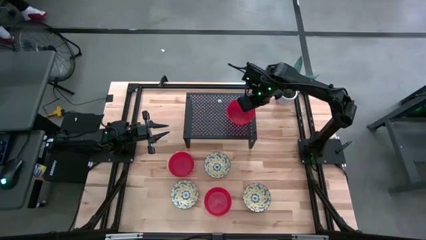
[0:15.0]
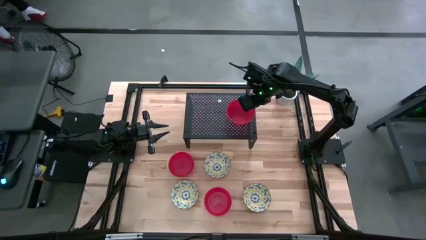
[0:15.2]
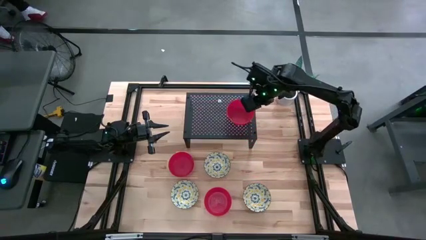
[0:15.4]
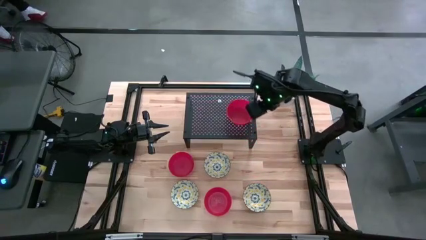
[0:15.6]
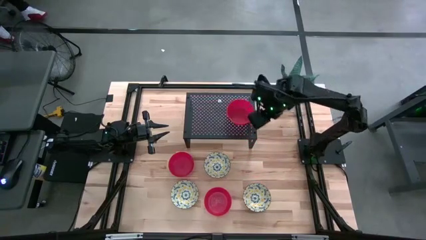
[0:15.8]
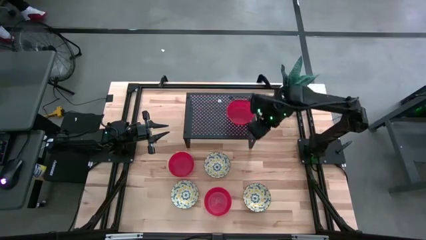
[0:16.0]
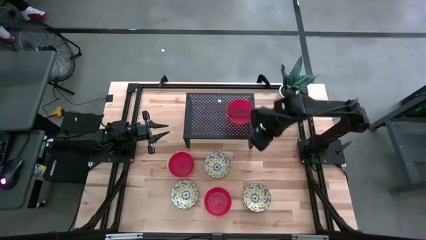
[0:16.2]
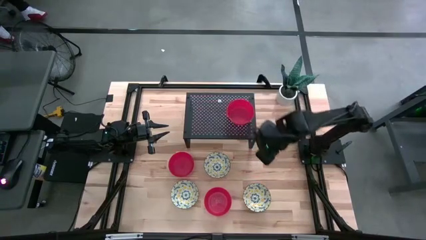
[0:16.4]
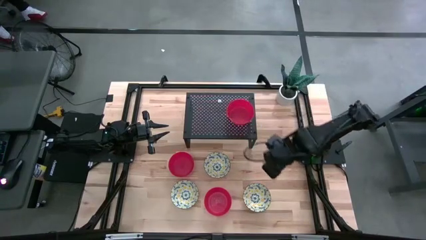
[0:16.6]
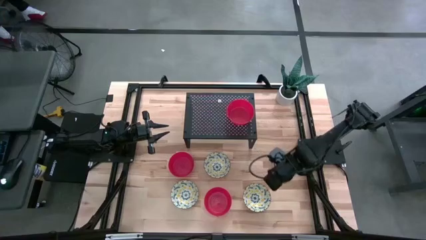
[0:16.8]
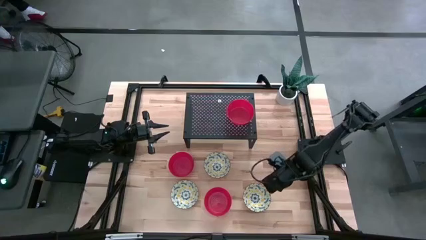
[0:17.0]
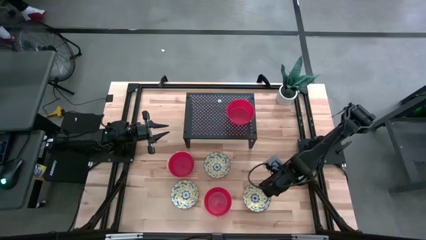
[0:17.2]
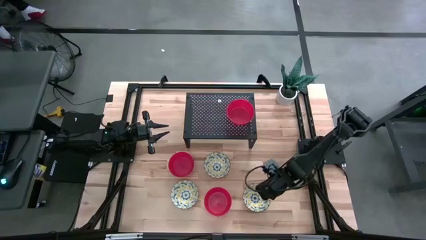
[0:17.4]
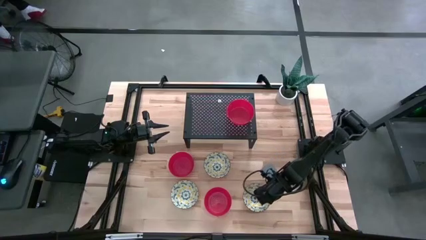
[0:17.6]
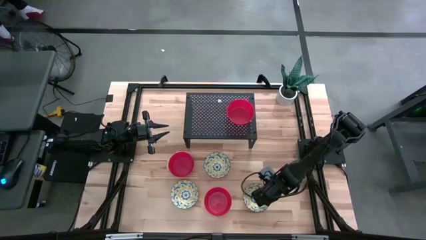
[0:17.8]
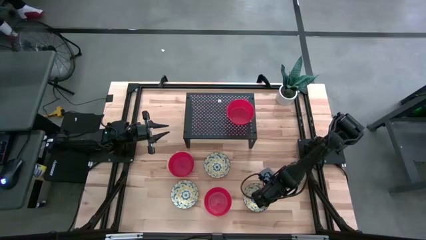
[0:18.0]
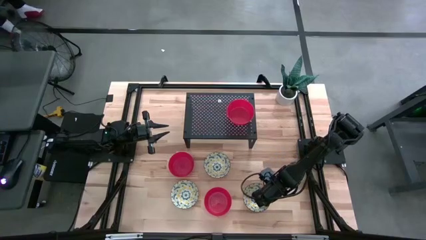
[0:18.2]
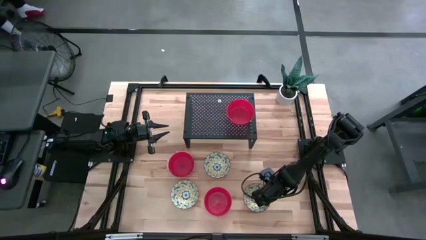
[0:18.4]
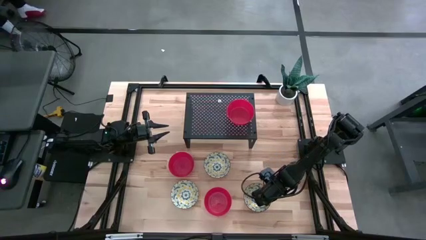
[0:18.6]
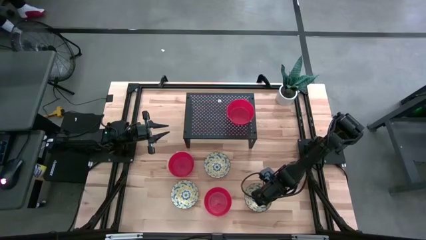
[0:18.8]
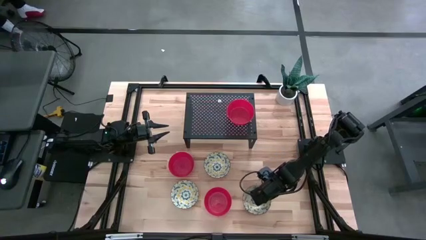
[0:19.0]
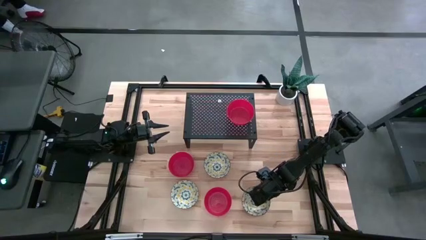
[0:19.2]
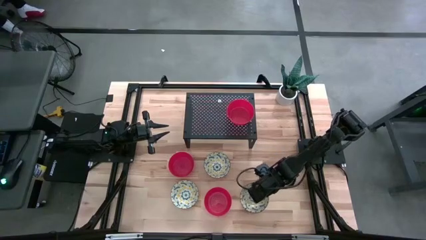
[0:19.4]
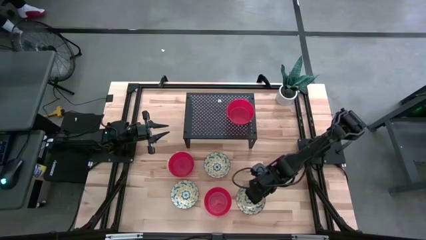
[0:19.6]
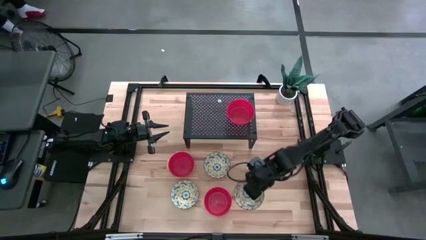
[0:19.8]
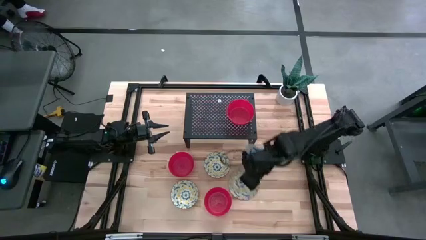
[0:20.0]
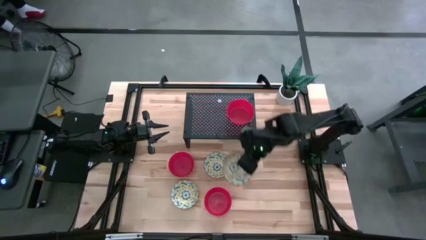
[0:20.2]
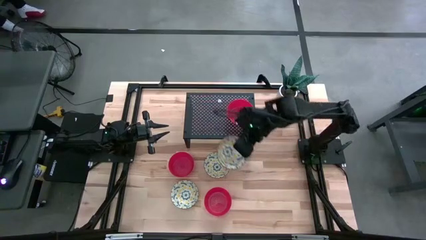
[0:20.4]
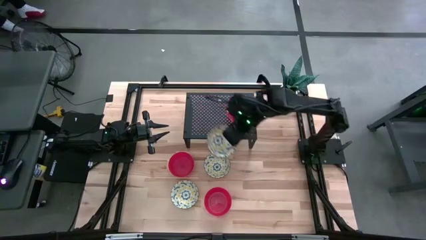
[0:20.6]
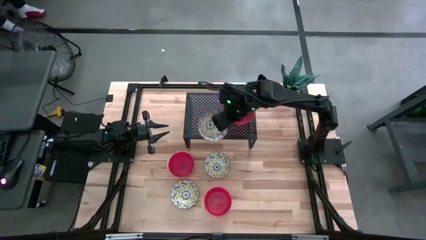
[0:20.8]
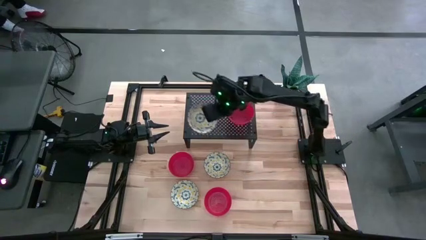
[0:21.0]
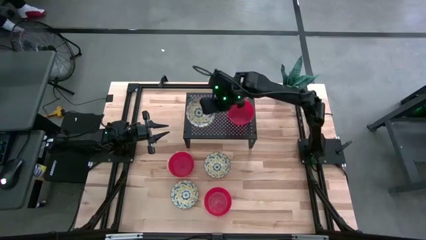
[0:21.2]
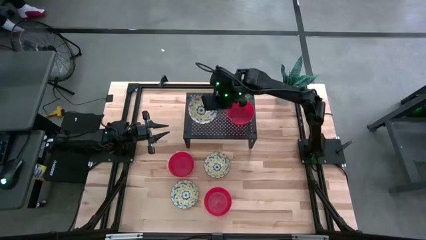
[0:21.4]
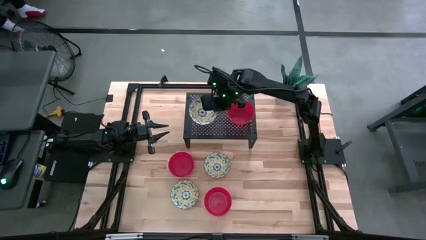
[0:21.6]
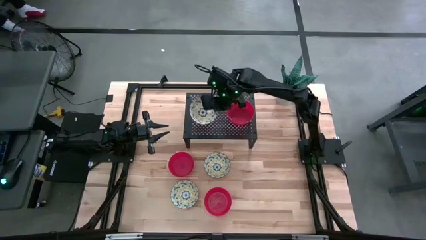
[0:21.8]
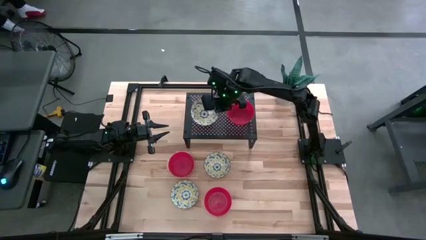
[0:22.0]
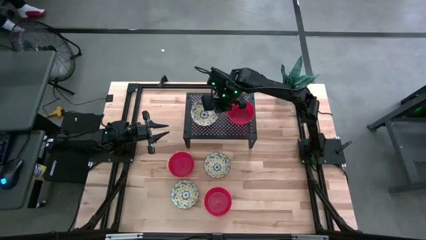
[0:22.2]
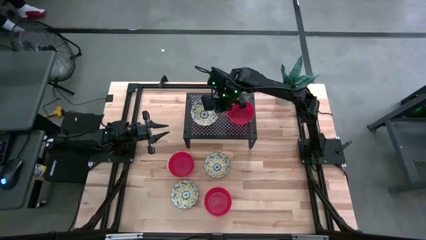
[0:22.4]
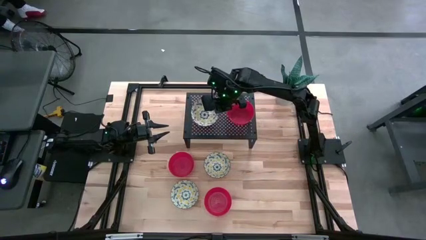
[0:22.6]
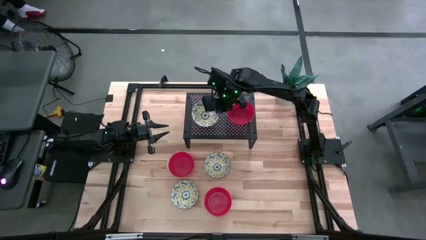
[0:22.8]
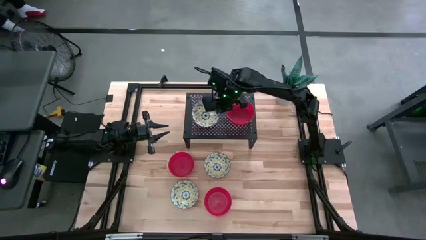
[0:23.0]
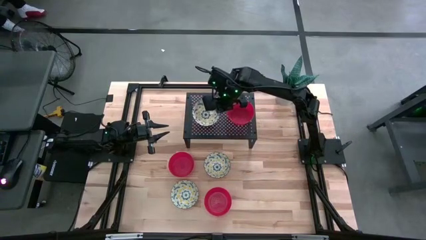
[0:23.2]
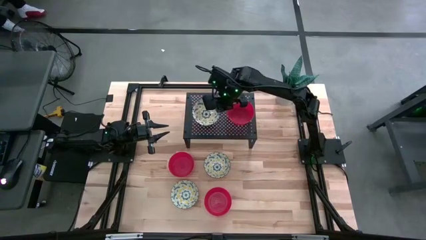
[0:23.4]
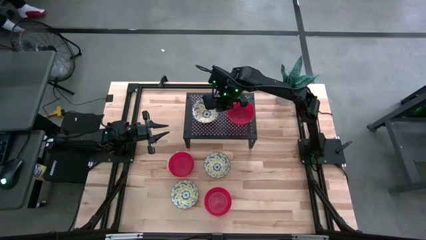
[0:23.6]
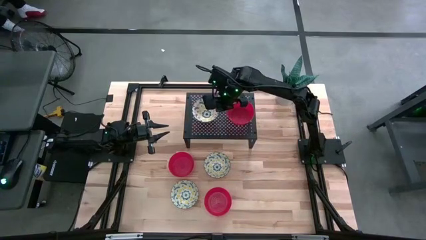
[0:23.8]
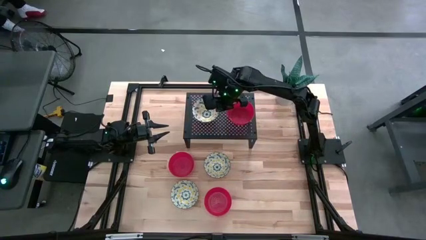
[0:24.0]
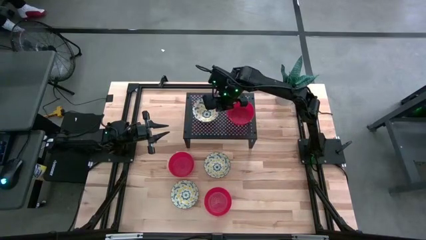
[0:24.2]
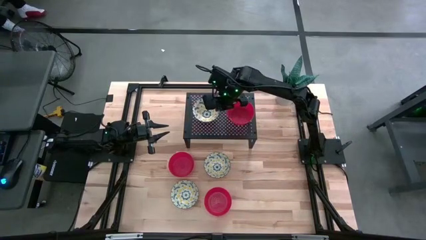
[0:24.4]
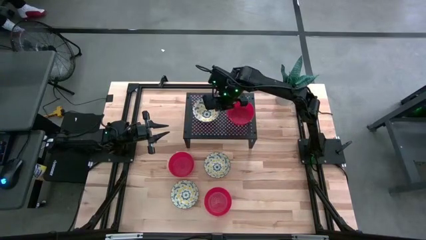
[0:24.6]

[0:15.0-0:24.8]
Task: Pick & Place Mini bowls
Put the bottom right yellow patterned bowl on the shelf

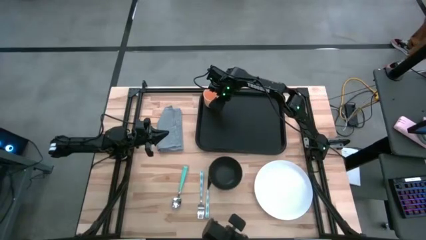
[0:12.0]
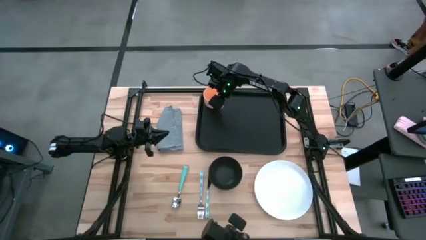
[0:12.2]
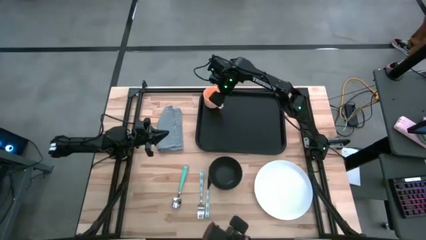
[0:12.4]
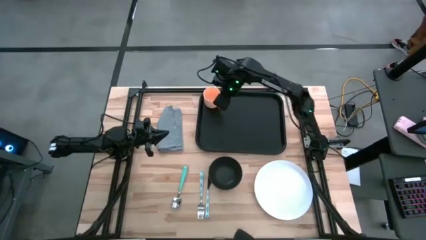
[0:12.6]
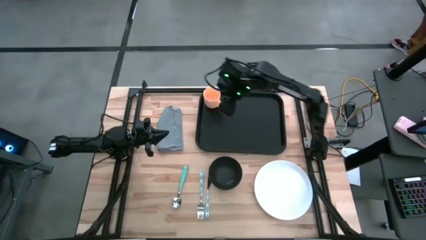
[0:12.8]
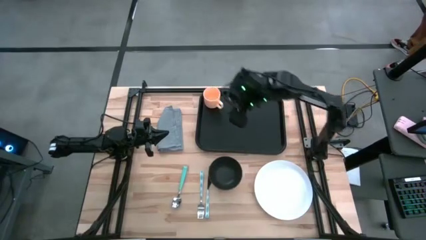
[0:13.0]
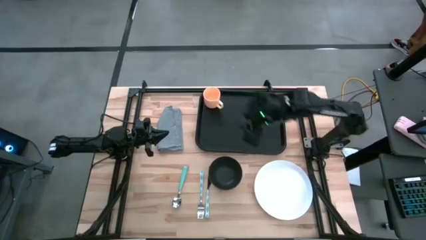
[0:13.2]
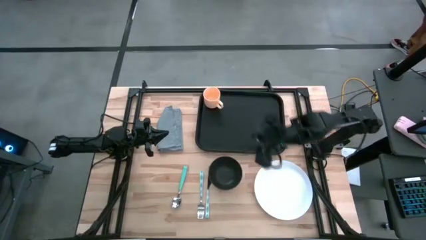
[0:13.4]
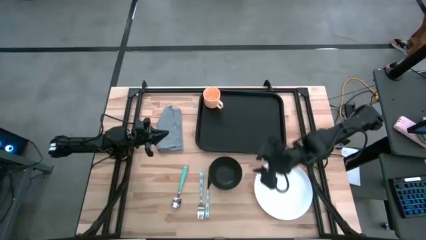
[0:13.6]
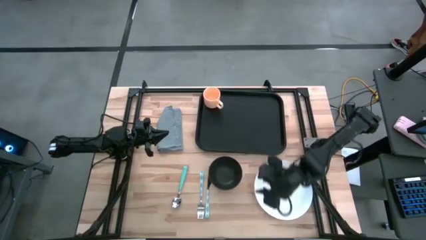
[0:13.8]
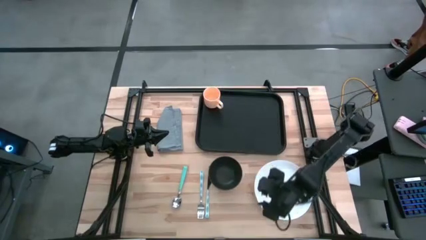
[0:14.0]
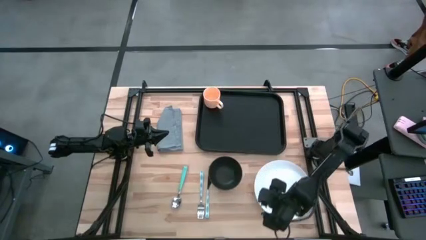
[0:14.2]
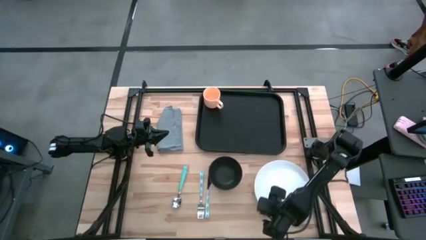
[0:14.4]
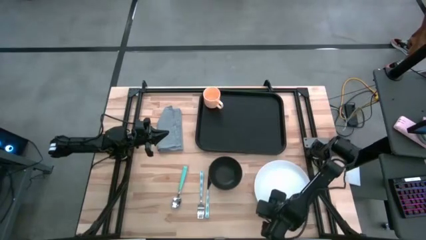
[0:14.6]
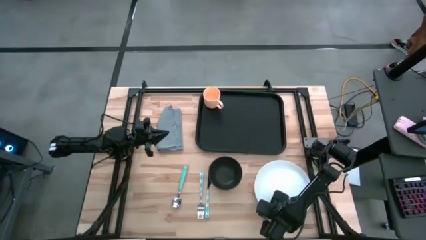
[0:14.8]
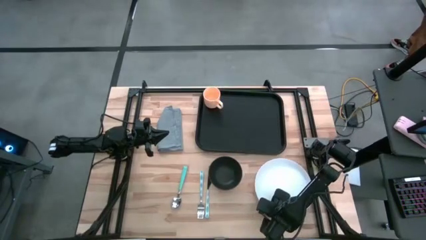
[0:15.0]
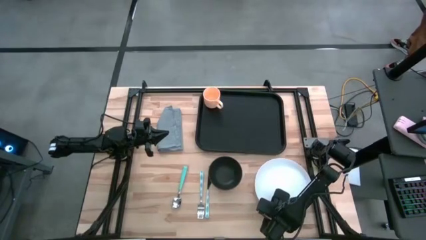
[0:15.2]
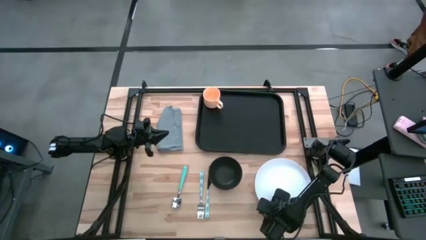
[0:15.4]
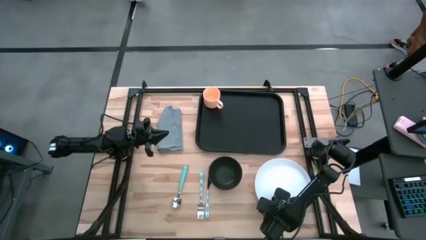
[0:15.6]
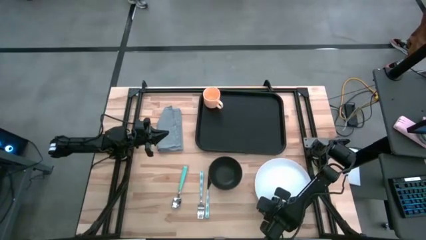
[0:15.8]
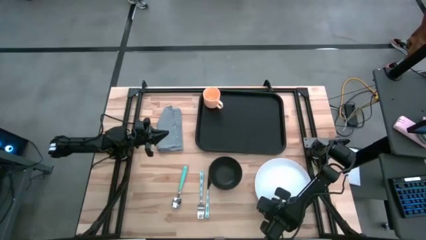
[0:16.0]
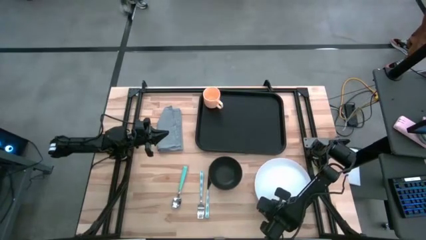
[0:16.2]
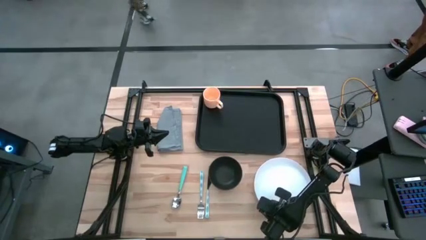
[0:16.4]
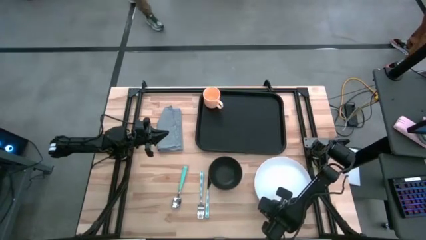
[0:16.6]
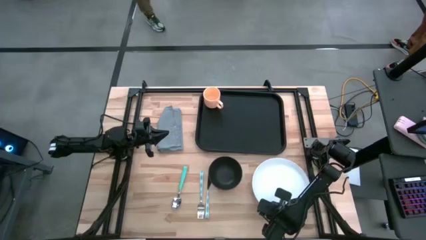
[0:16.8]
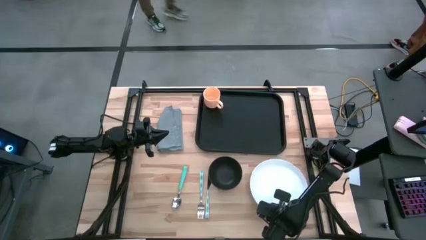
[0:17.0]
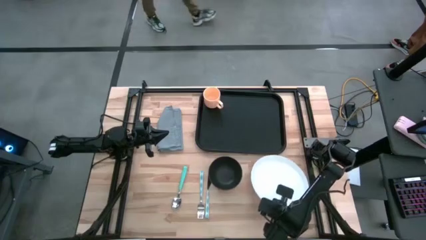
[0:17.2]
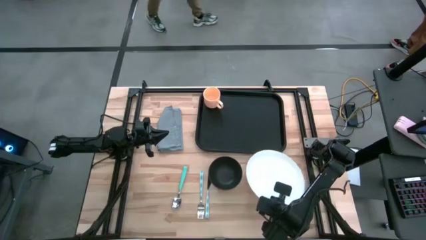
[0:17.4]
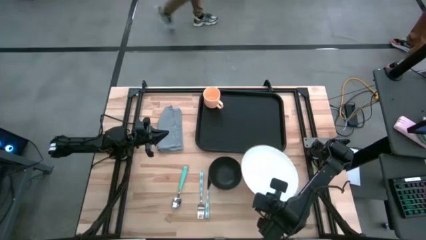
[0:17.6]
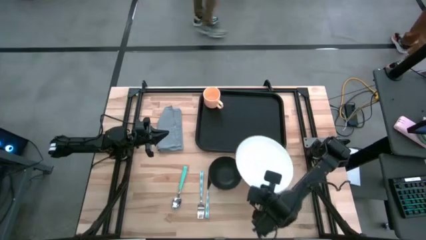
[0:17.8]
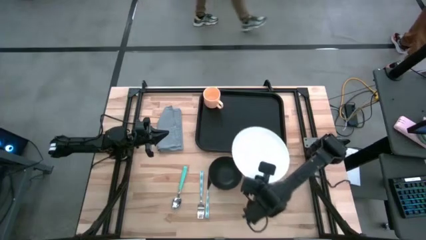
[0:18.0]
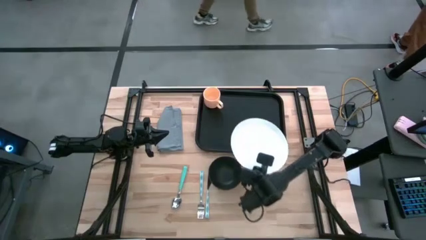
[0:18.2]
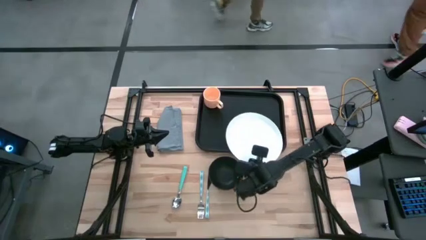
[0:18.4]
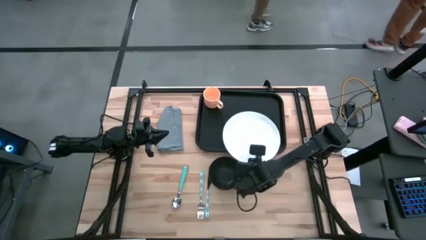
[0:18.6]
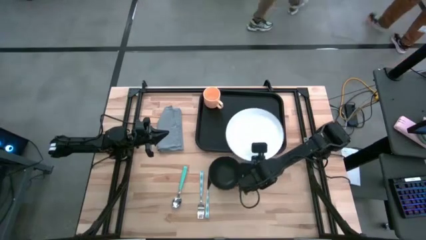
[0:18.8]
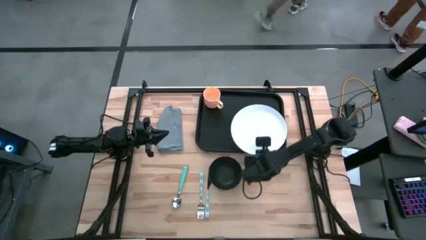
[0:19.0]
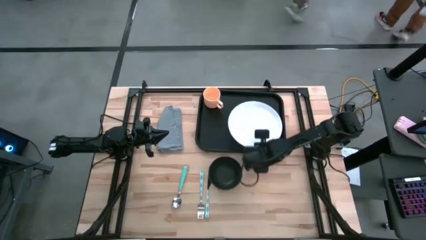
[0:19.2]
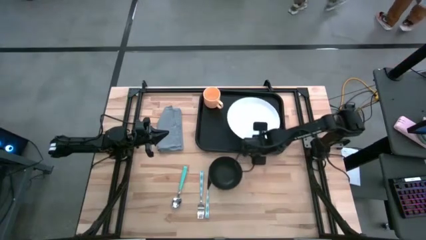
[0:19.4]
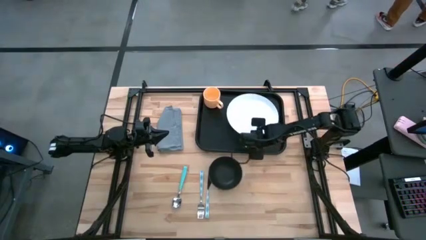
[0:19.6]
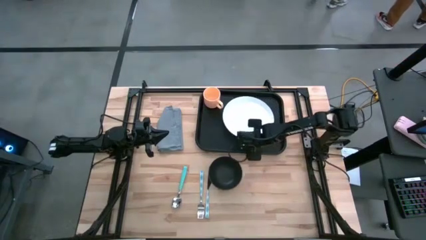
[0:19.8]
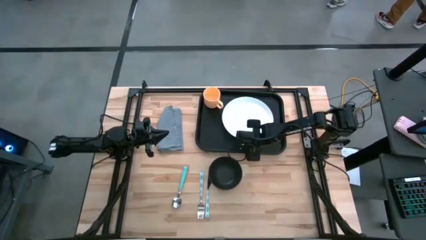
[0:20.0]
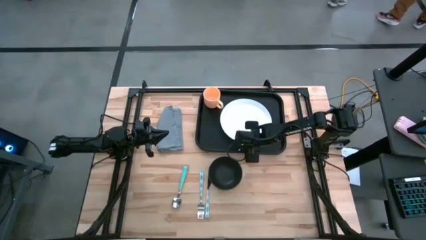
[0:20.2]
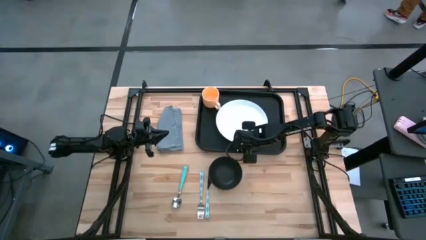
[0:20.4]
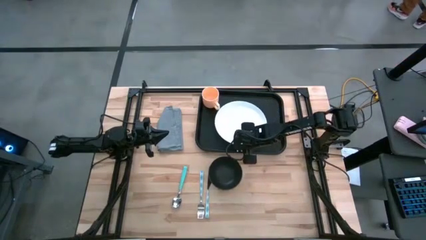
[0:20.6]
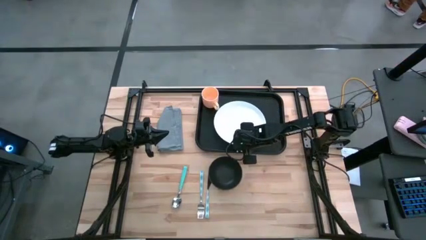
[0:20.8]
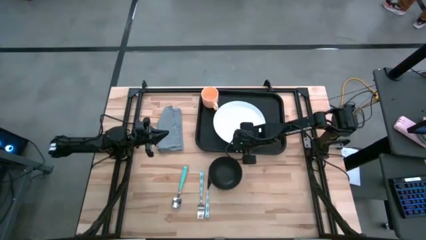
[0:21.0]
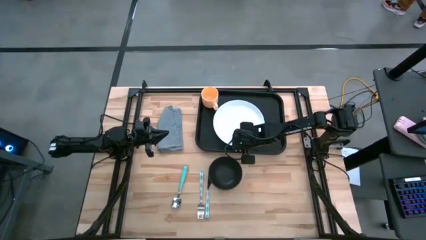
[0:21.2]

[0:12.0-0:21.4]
Task: Set up tray
Put the white plate on the black tray to the bottom right of the yellow mug
